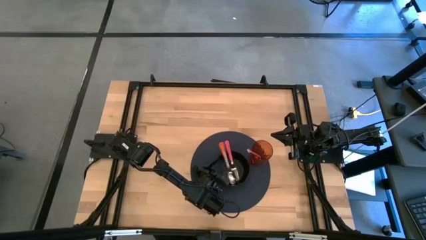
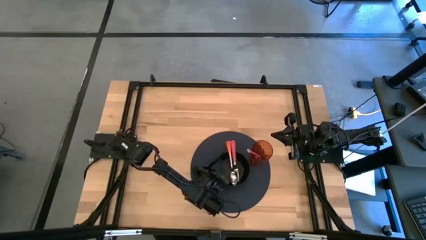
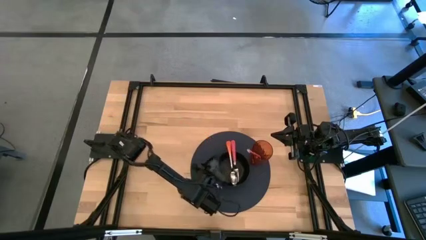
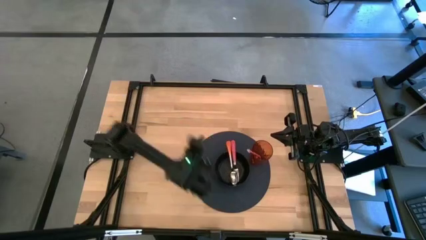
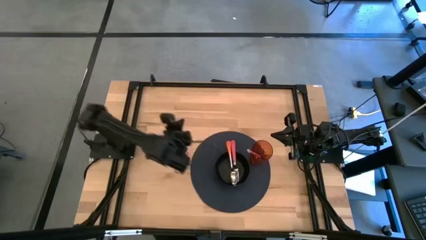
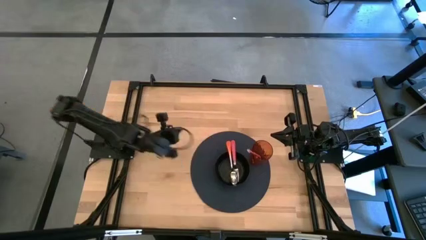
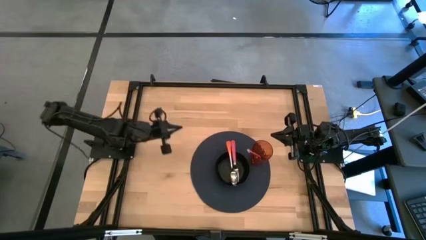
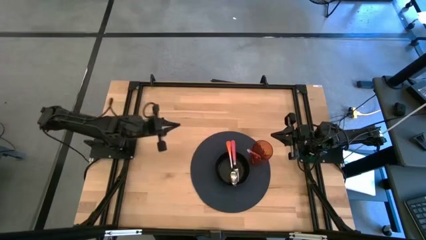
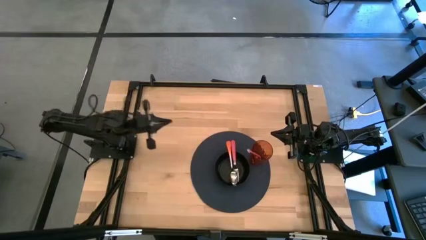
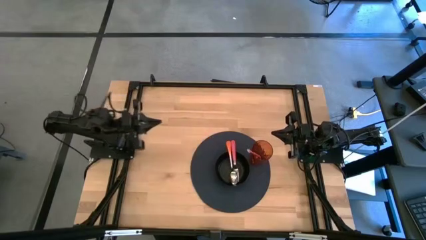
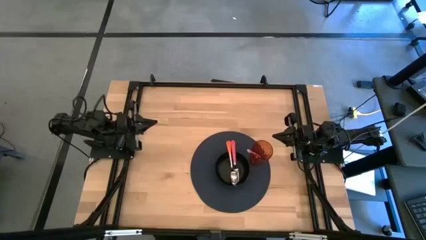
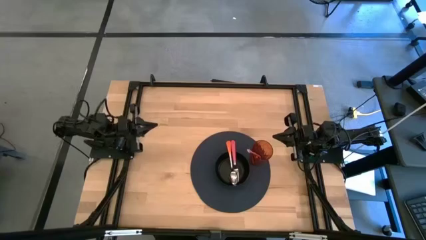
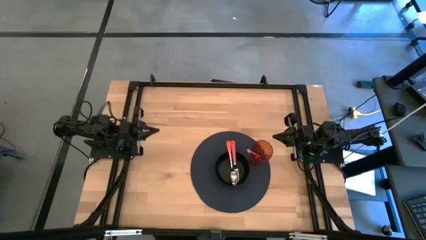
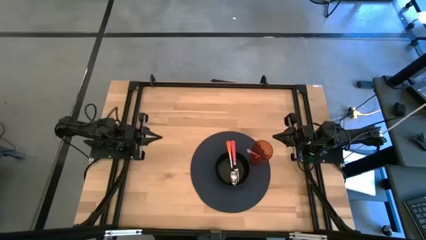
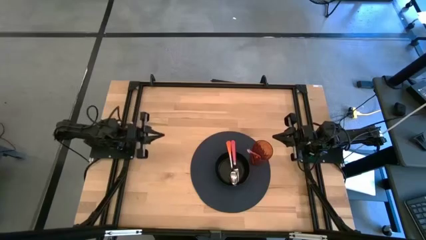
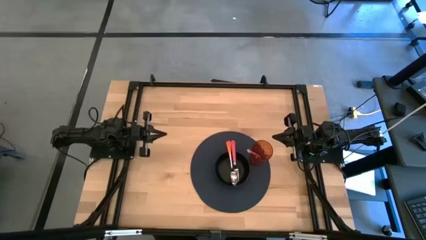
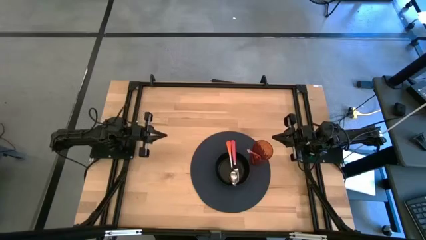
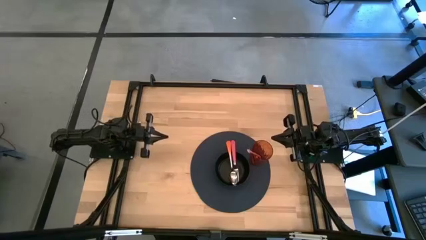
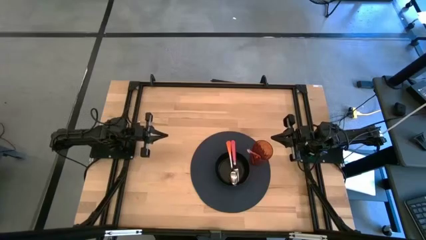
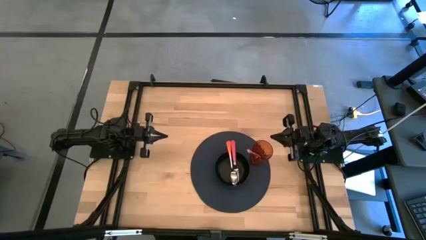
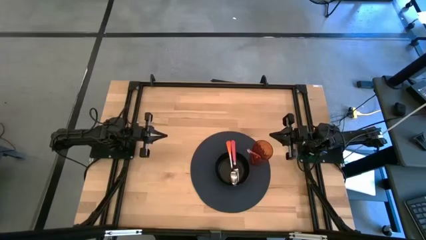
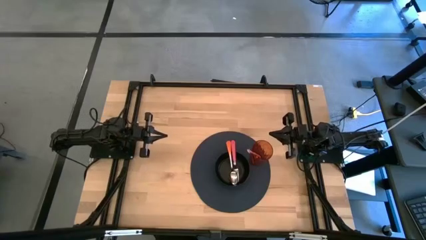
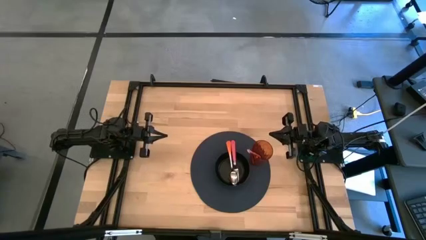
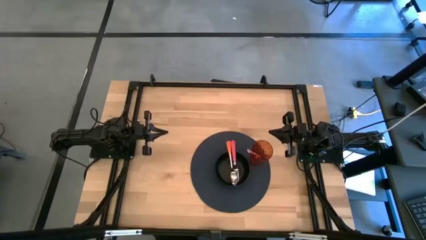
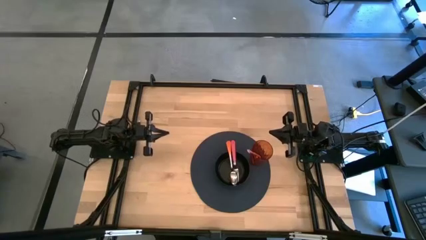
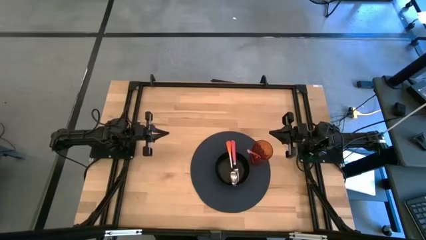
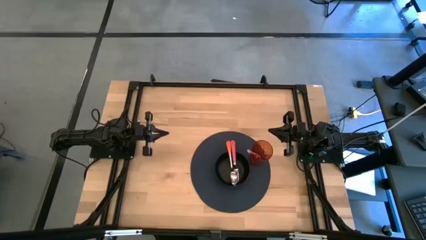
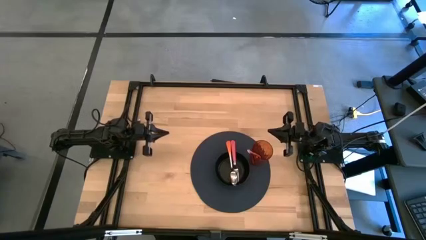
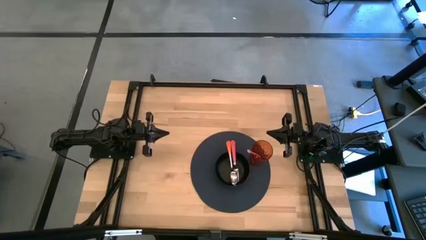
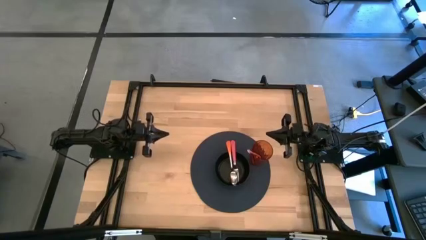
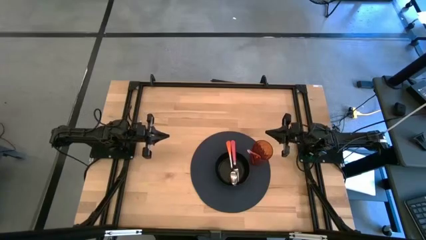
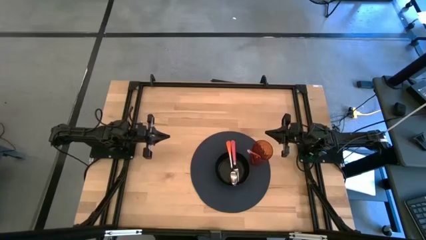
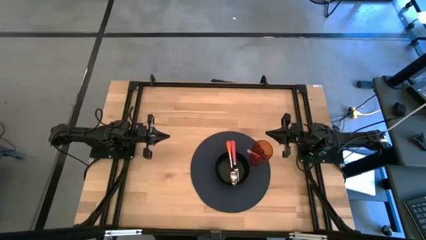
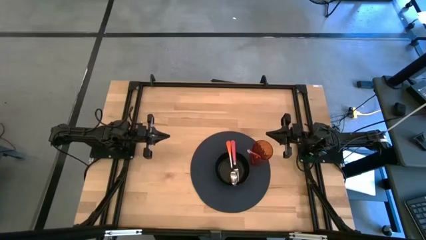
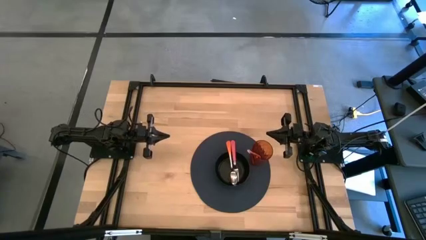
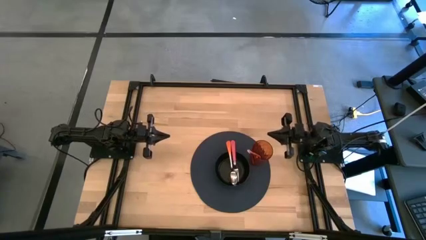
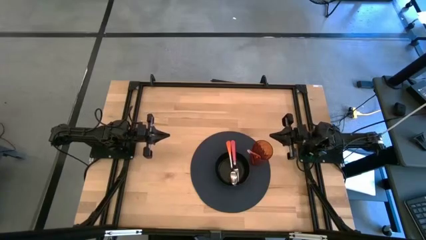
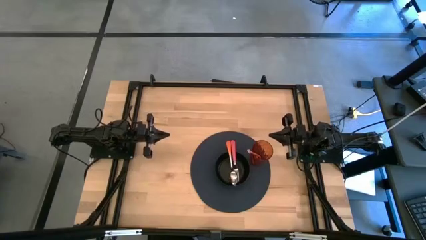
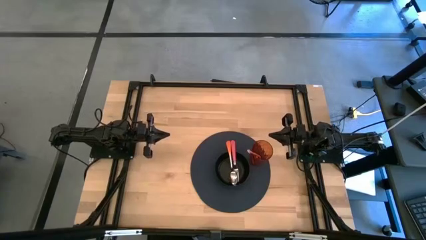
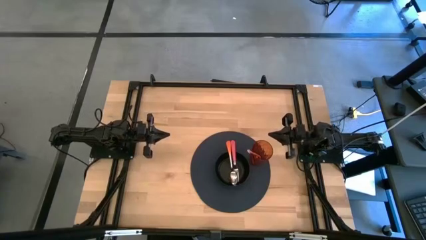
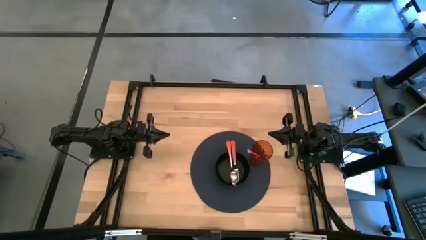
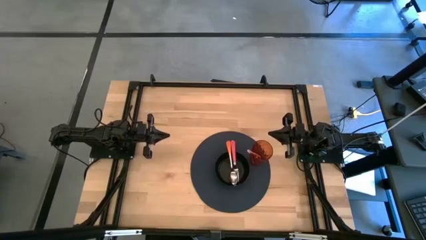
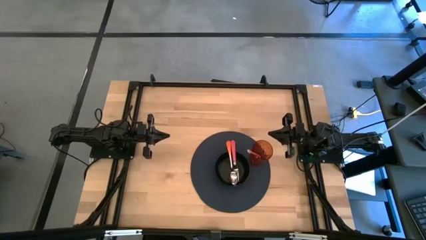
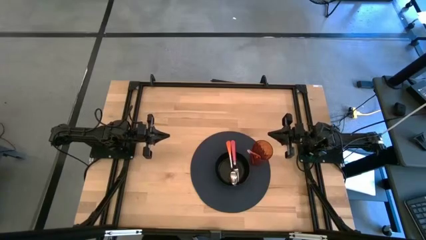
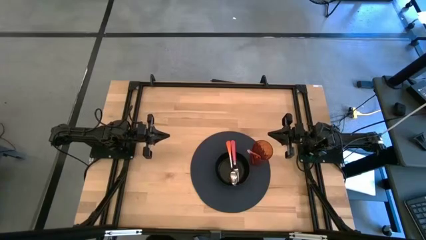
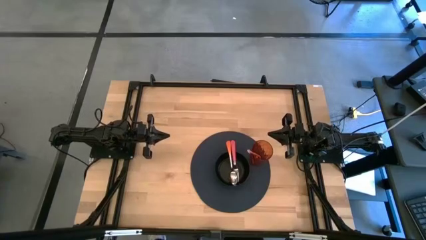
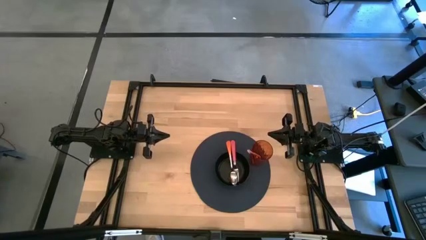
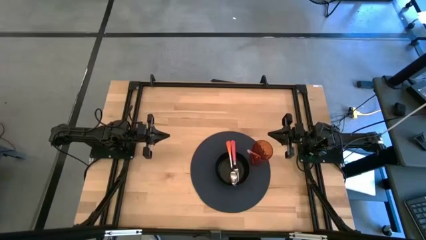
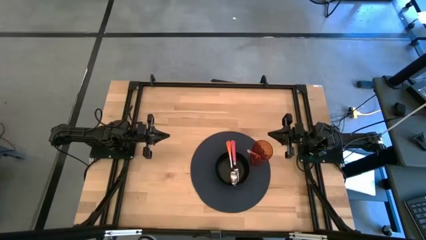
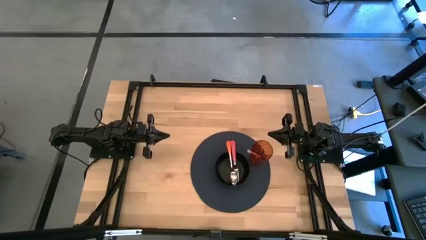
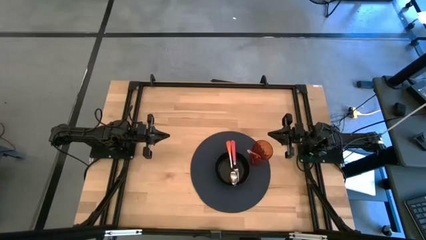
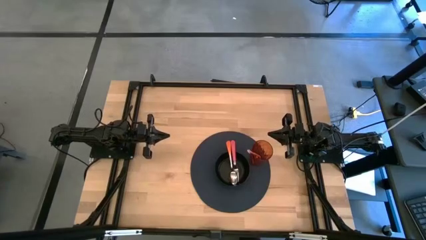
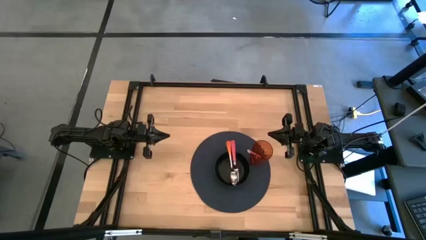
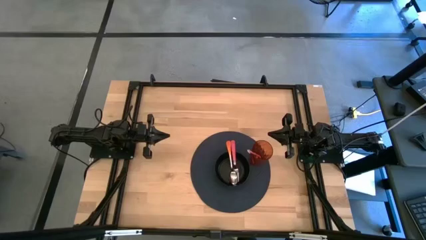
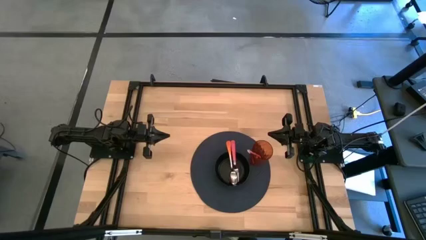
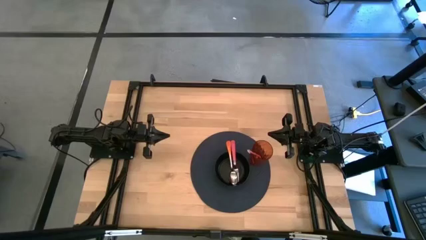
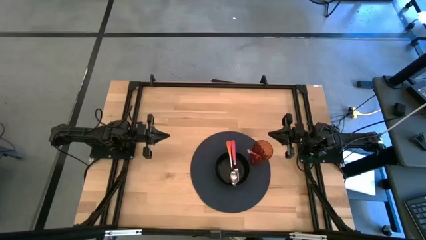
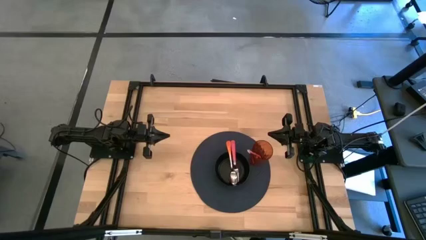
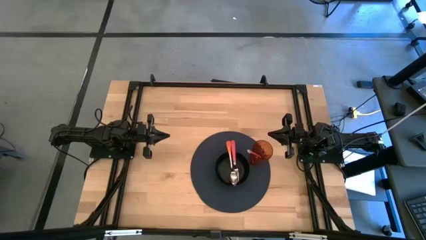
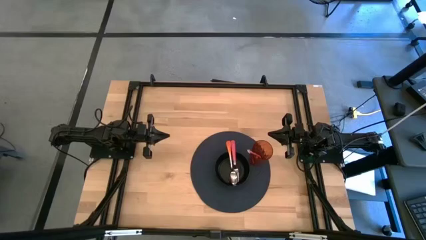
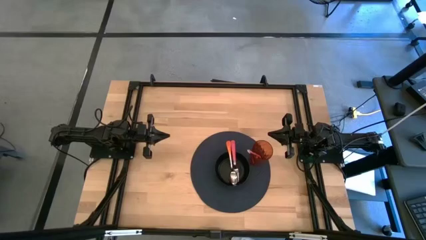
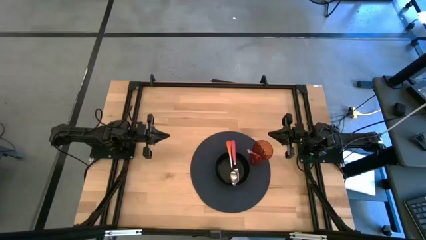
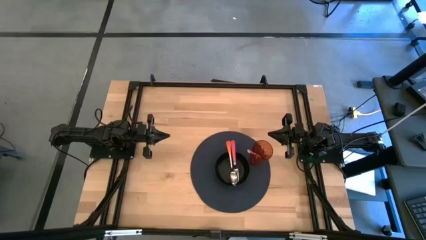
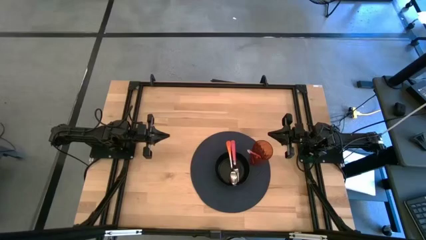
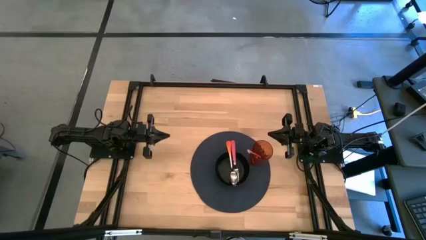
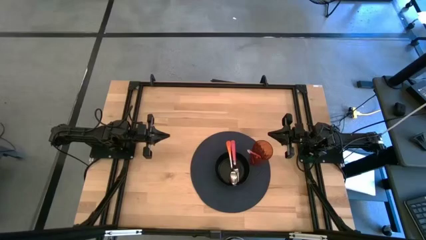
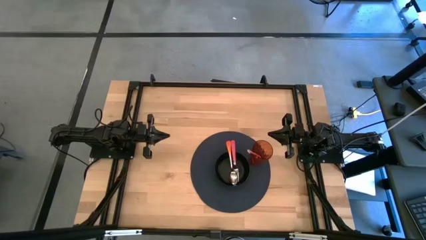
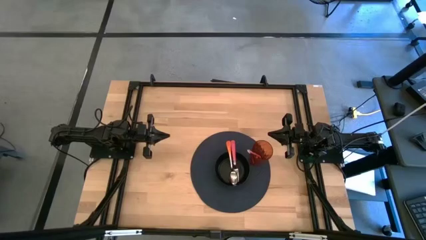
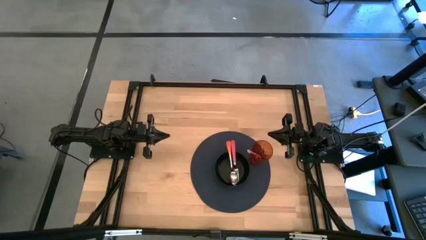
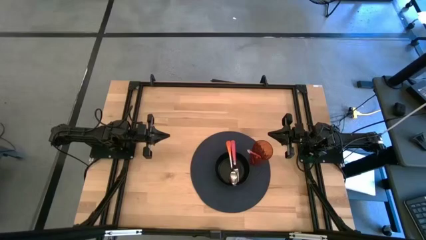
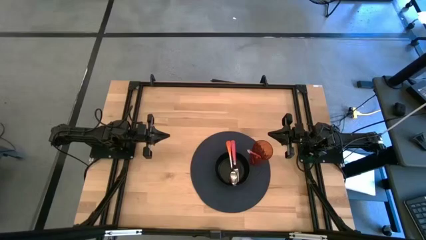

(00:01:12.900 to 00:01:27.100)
Task: Pick & Place Utensil
Return to Home Position

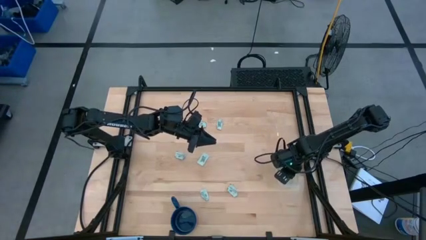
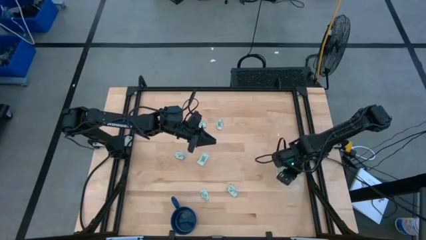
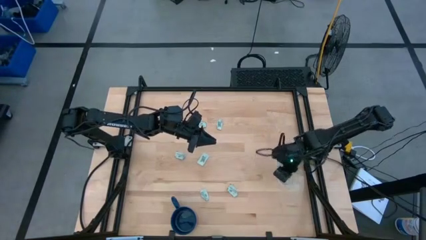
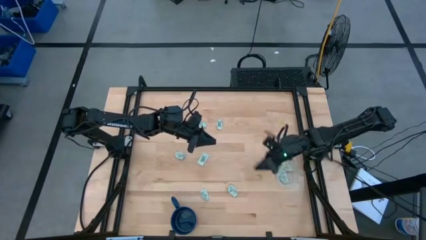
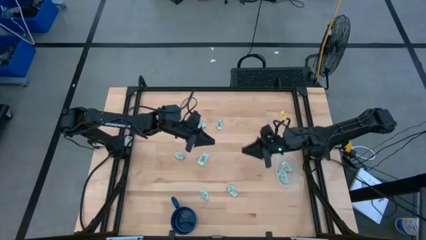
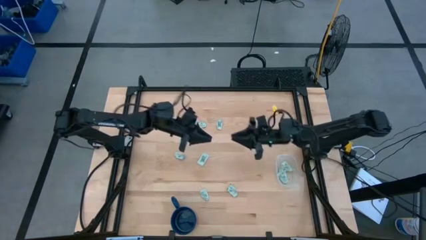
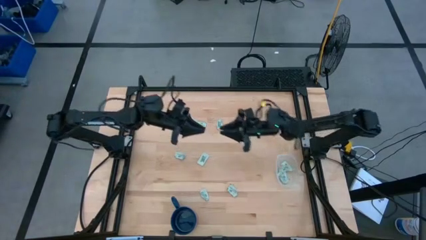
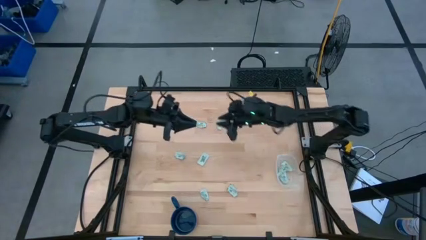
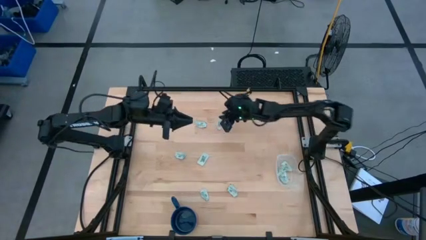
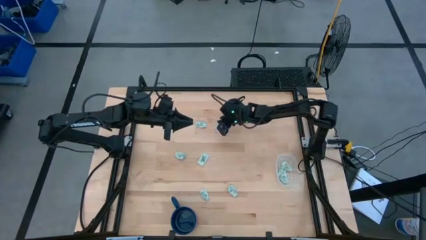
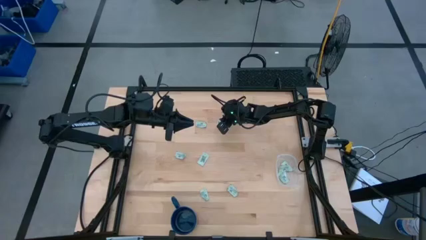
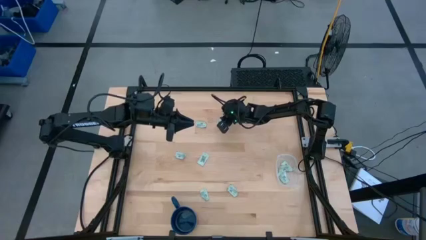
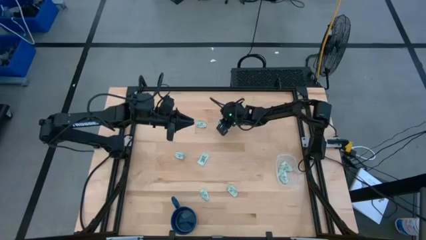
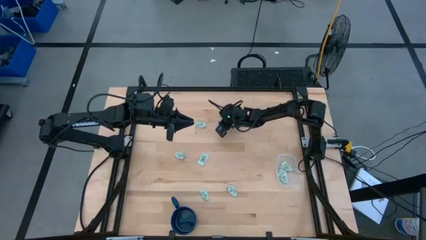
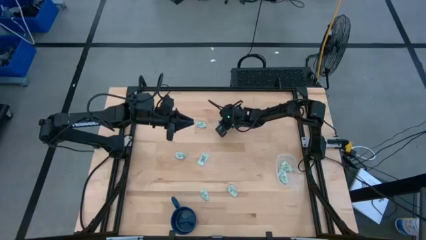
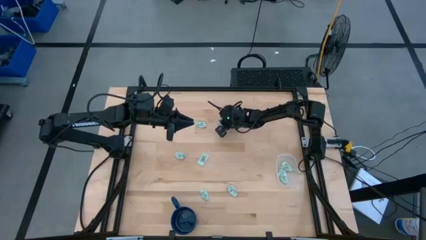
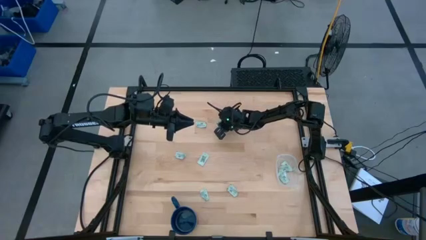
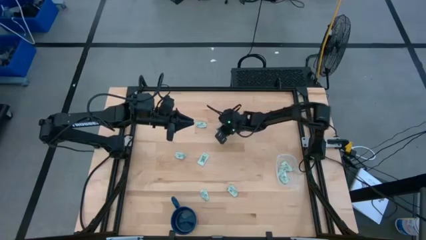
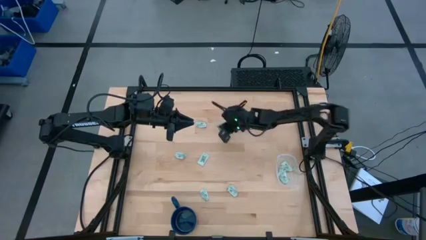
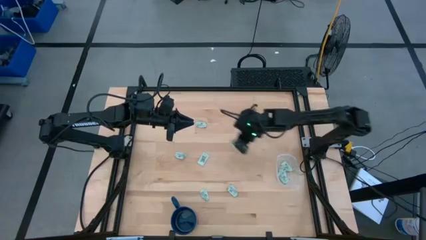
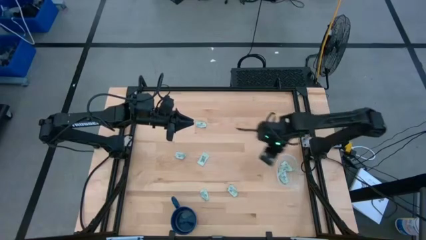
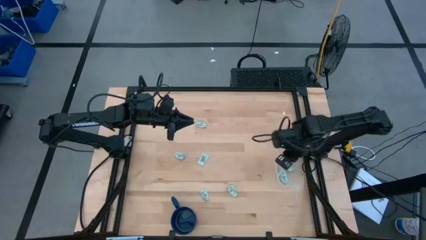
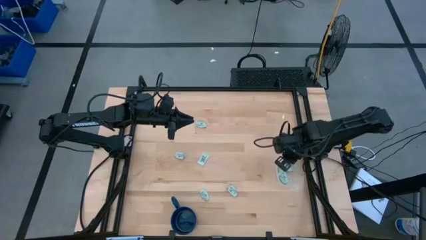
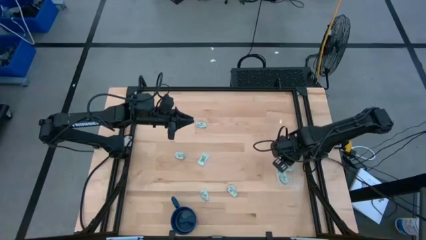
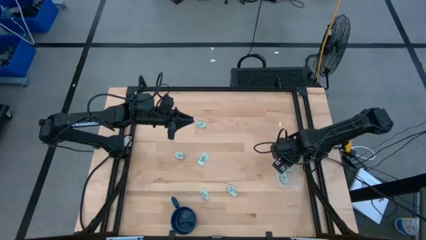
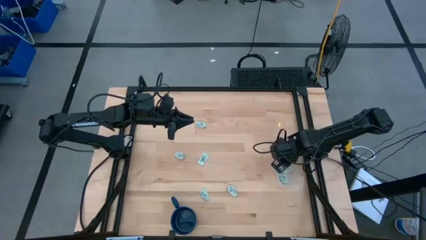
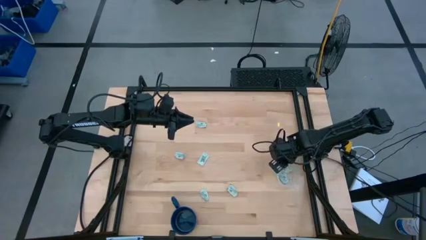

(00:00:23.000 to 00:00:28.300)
Task: Pick and place Stevia / Truvia into bins
Put the green stevia packet into the transparent container
